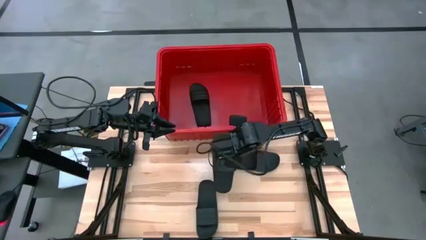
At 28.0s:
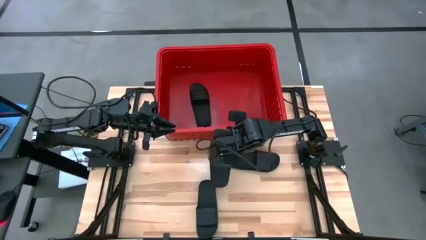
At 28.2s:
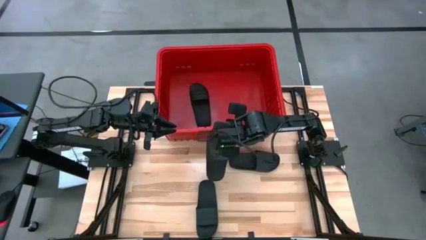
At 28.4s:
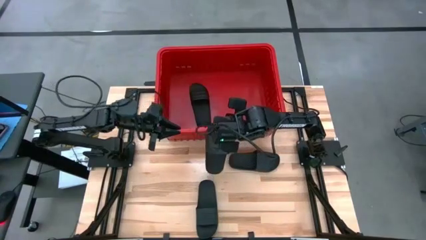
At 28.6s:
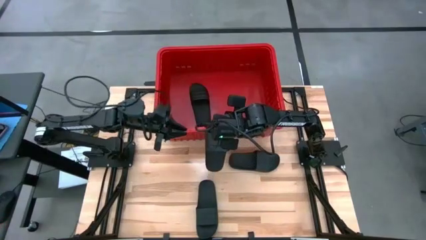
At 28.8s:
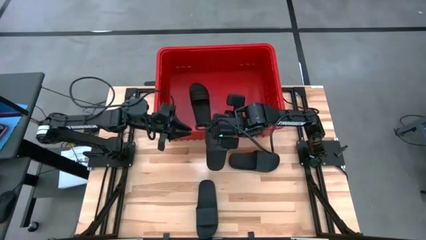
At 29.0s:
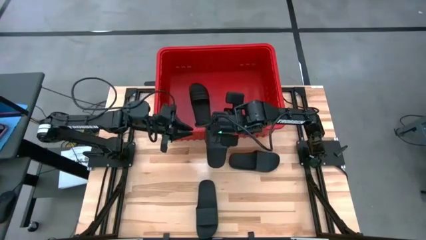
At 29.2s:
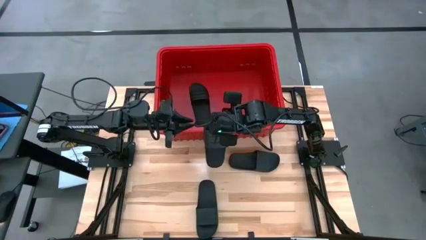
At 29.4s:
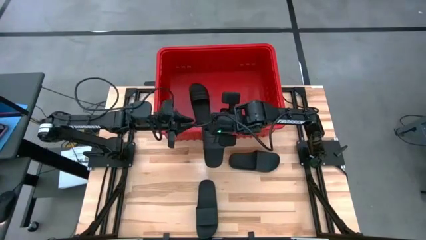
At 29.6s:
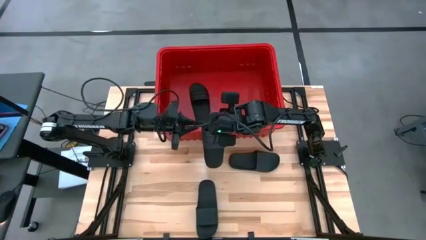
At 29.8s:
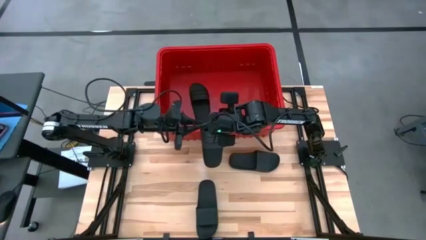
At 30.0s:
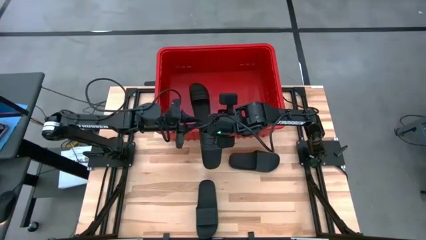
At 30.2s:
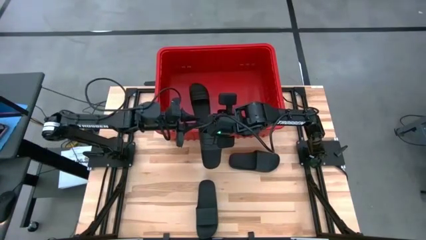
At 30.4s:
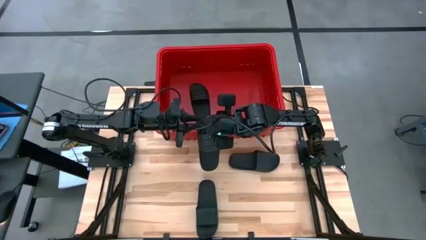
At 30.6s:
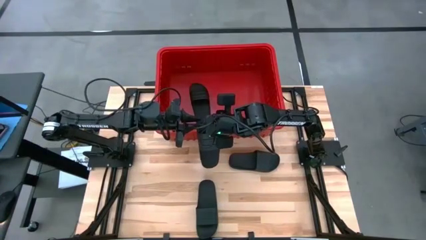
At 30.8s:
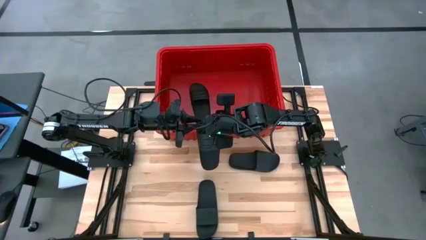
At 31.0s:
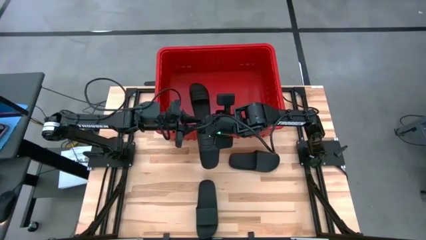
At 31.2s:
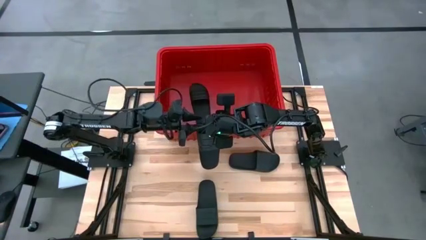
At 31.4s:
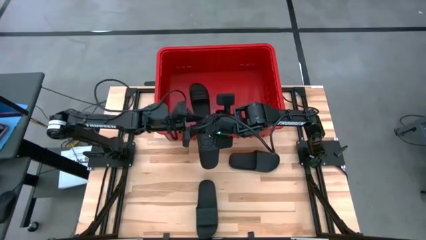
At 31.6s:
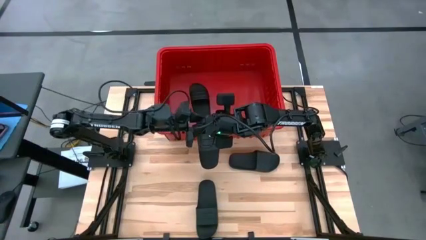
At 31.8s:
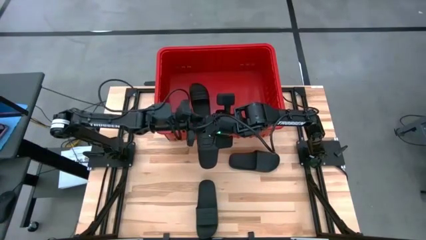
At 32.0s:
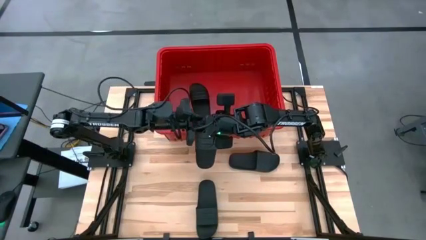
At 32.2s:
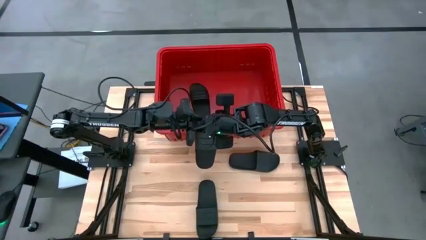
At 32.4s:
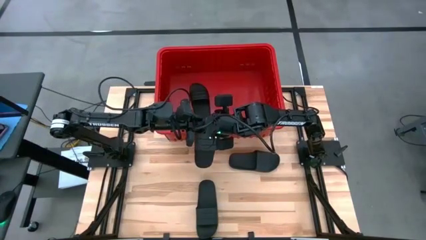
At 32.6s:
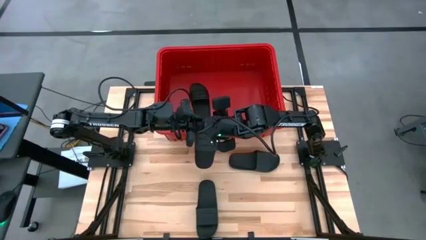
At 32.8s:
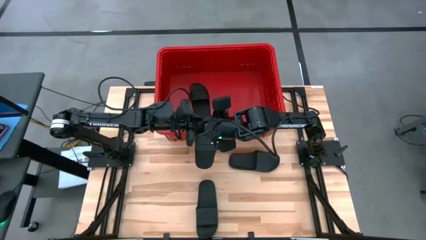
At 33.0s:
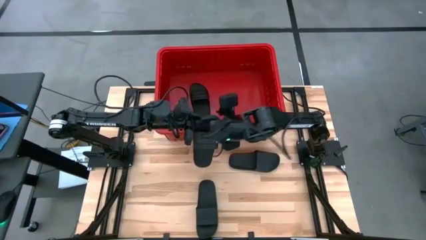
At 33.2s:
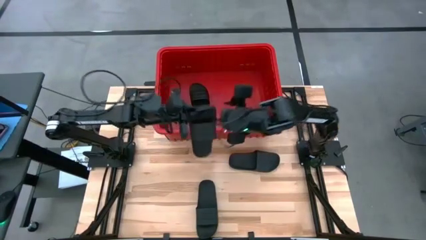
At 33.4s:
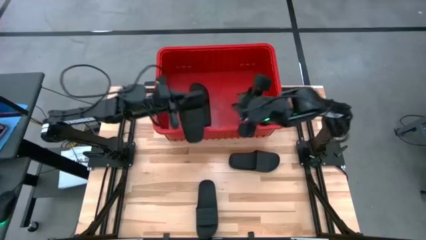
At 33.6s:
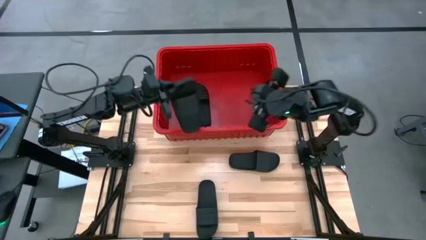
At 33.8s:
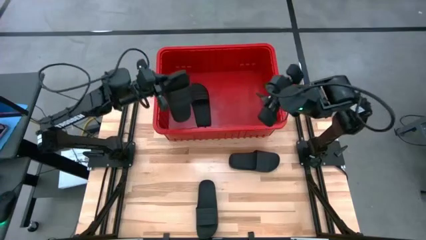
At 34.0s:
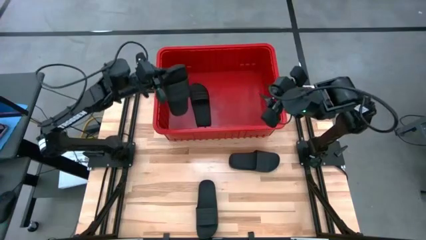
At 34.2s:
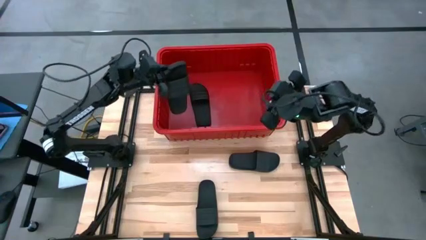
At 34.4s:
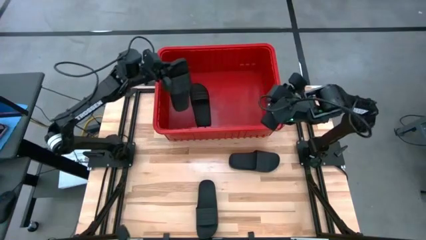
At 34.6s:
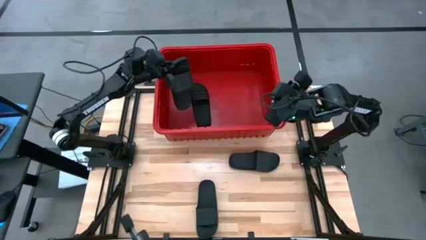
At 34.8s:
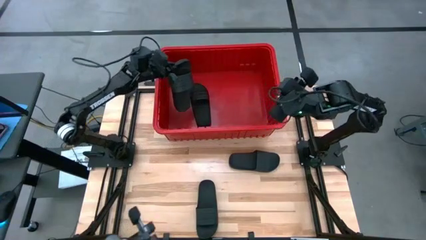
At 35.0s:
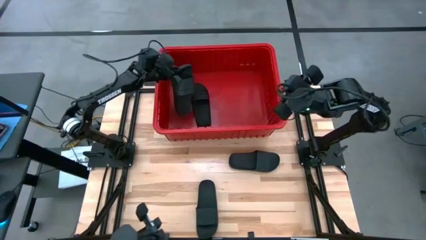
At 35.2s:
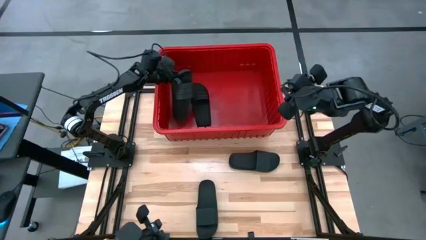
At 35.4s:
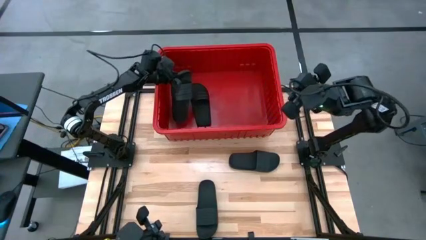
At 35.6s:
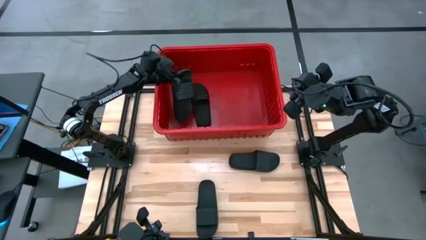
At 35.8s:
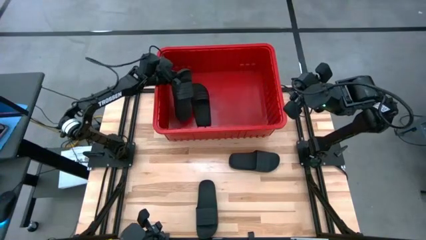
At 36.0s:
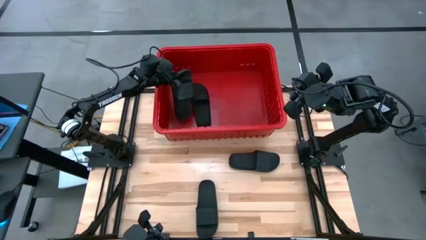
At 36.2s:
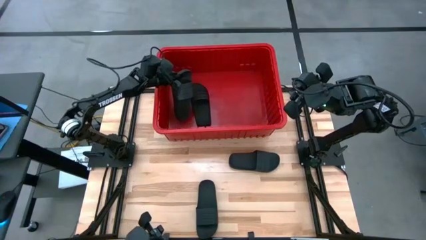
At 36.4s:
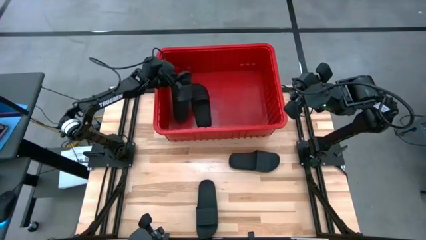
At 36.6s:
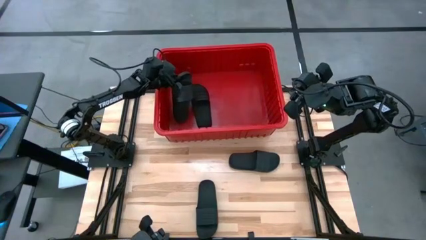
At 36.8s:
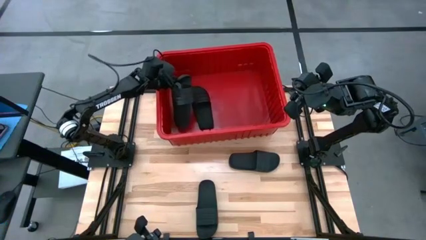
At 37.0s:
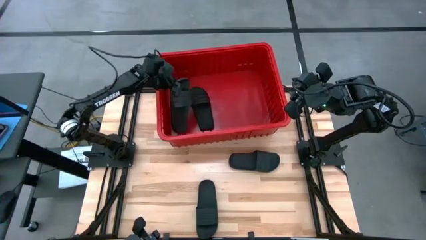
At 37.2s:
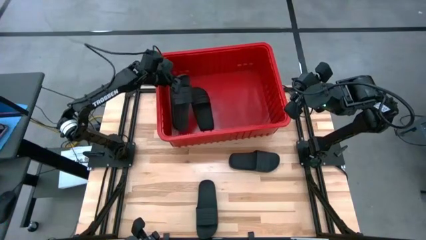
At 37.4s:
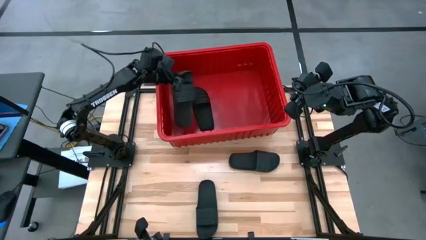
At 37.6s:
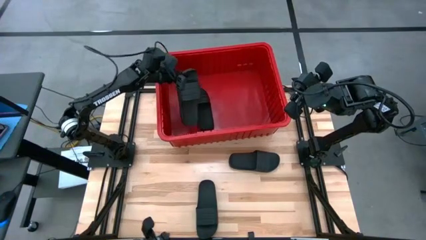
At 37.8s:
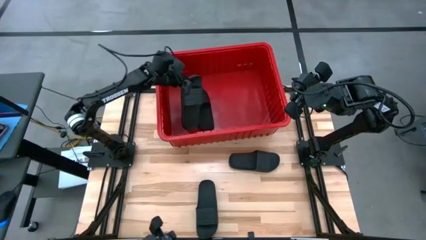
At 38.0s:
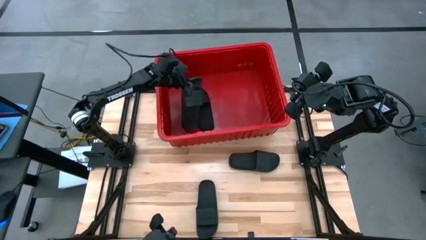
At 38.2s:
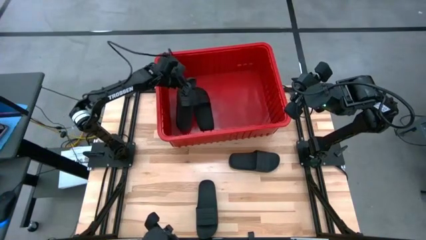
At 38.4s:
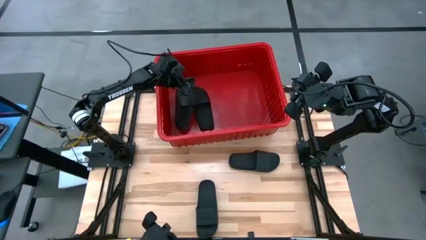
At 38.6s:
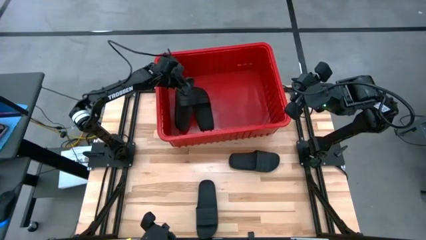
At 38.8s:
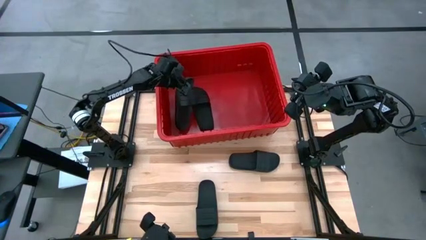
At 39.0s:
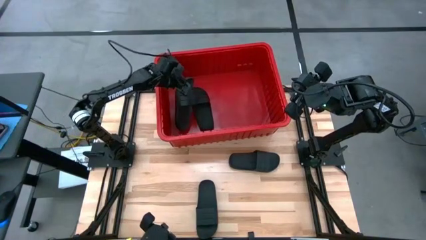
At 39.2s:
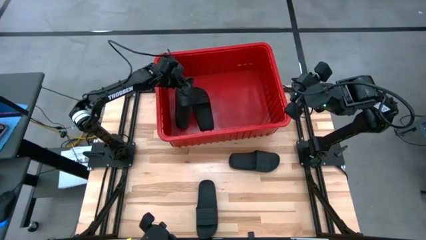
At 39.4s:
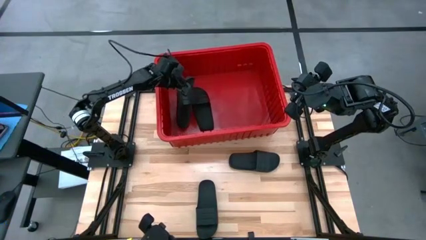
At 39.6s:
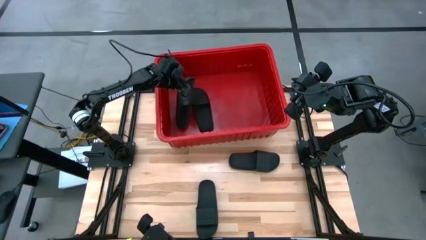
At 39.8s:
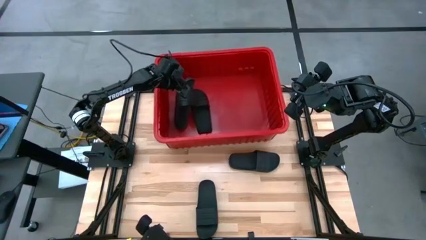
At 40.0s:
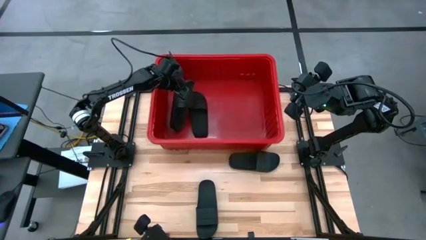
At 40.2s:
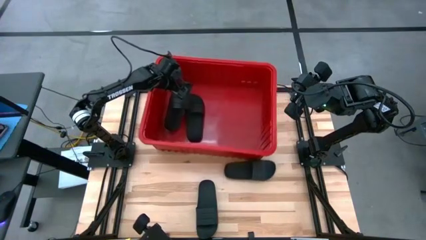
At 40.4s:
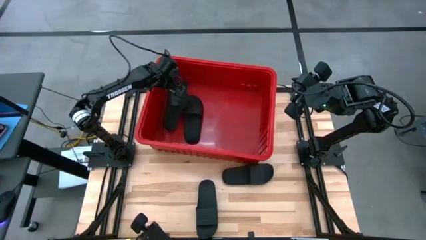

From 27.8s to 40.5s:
Task: Pick and place slides into bin
Put the black slide into the red organizer bin
